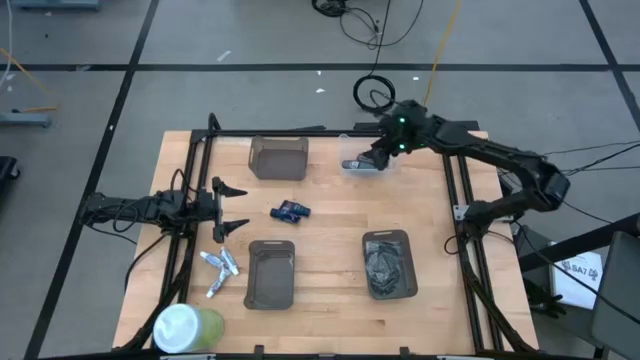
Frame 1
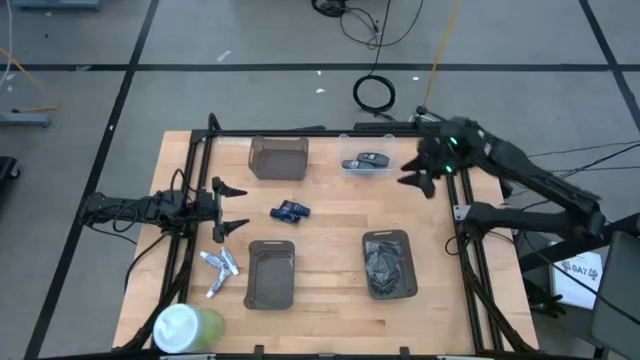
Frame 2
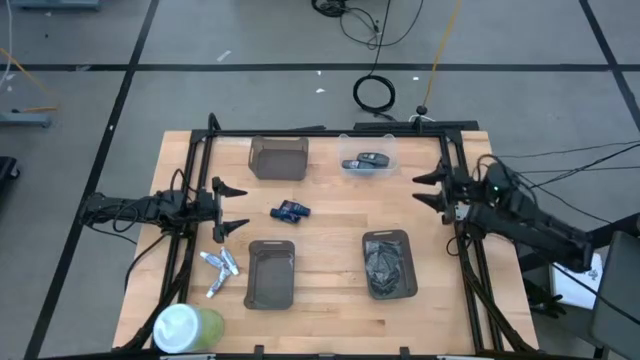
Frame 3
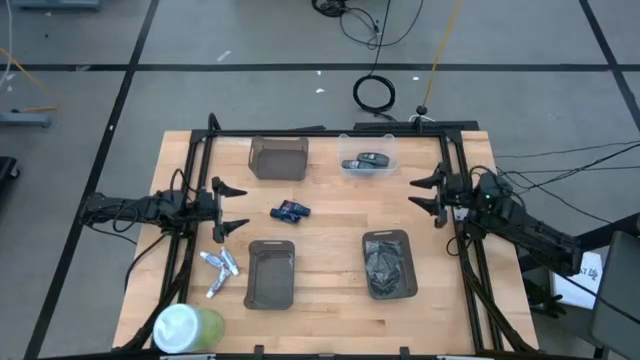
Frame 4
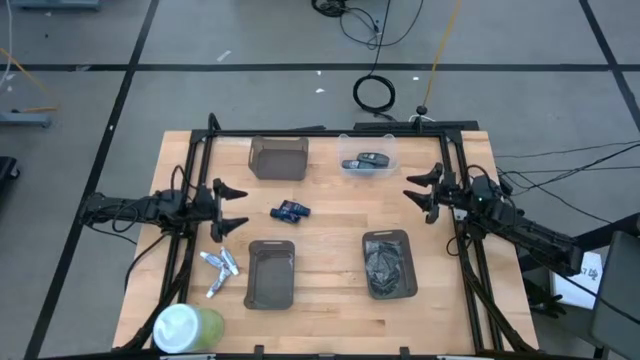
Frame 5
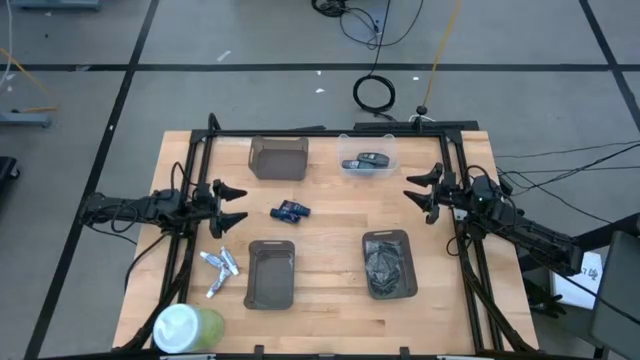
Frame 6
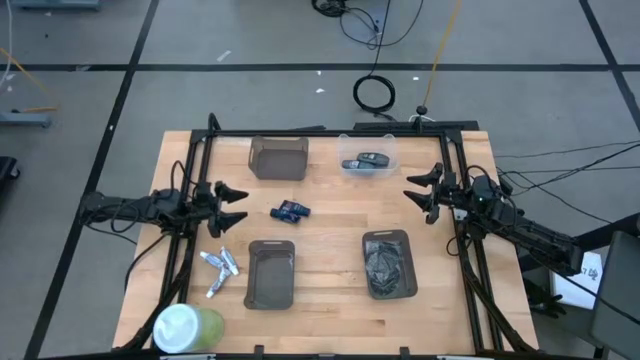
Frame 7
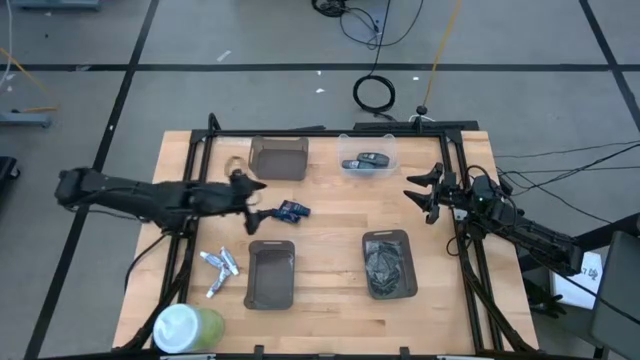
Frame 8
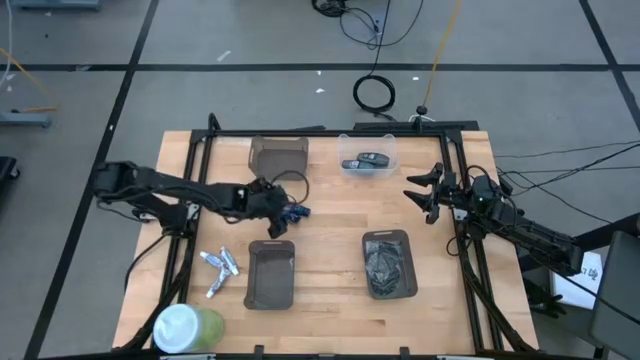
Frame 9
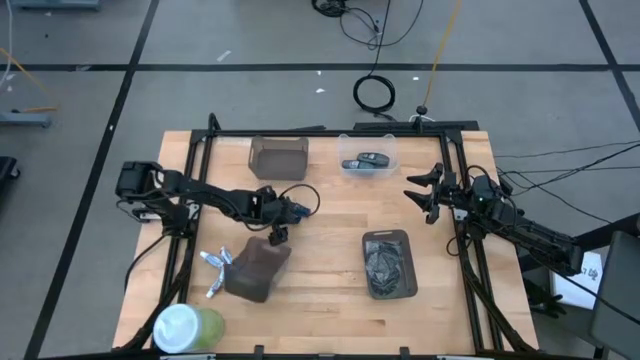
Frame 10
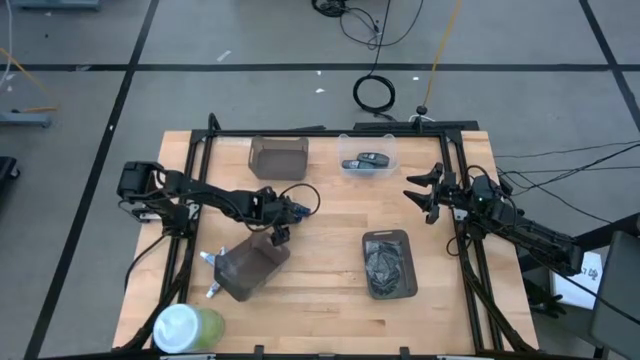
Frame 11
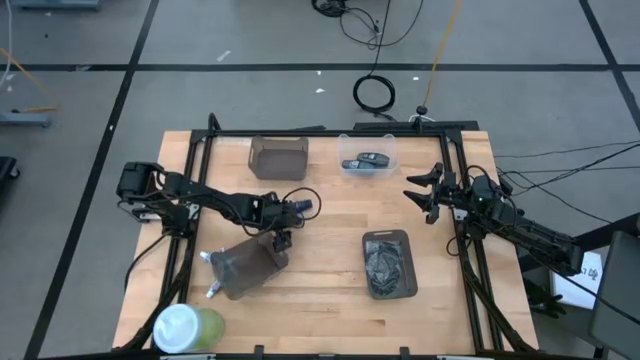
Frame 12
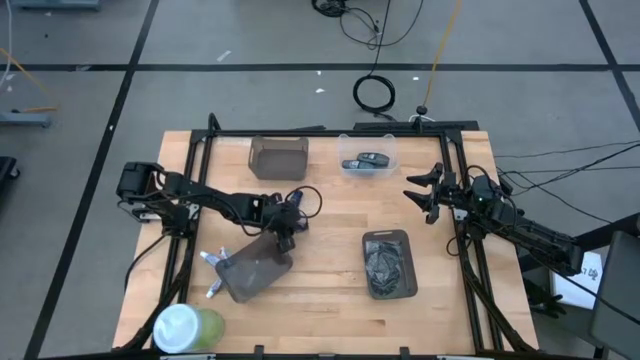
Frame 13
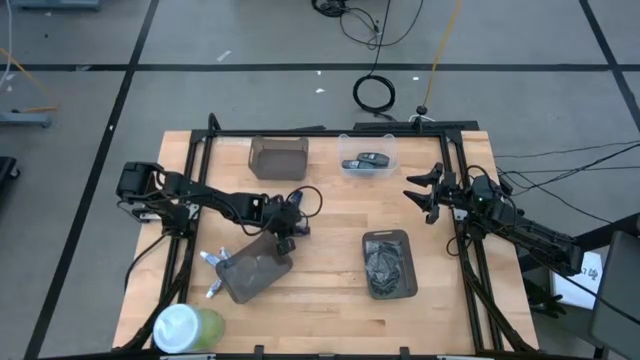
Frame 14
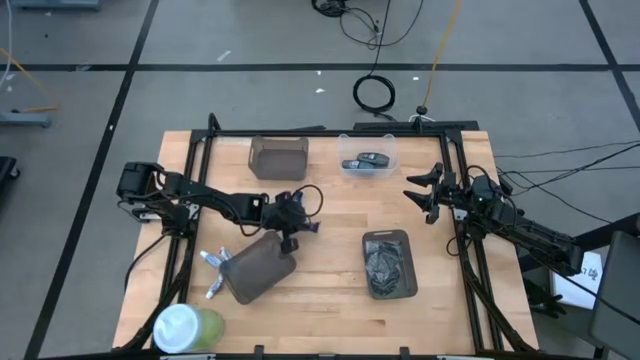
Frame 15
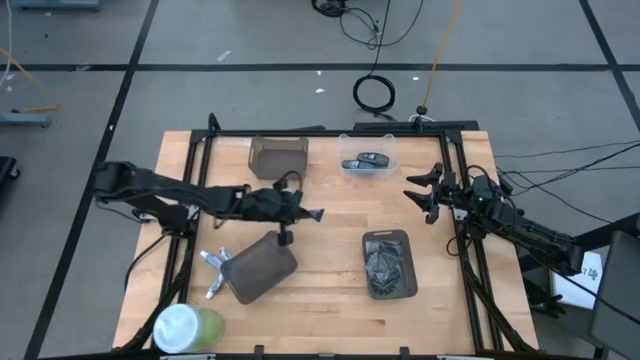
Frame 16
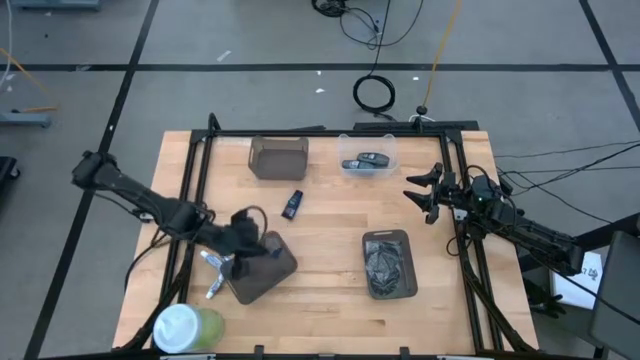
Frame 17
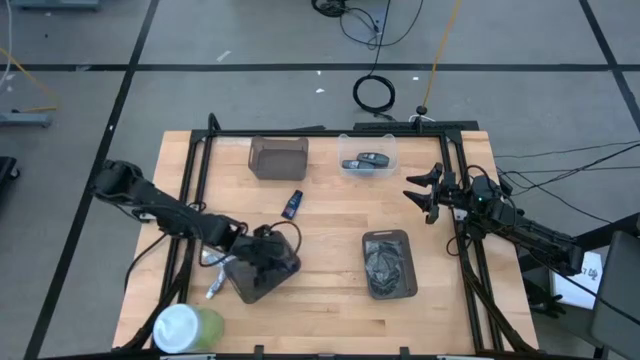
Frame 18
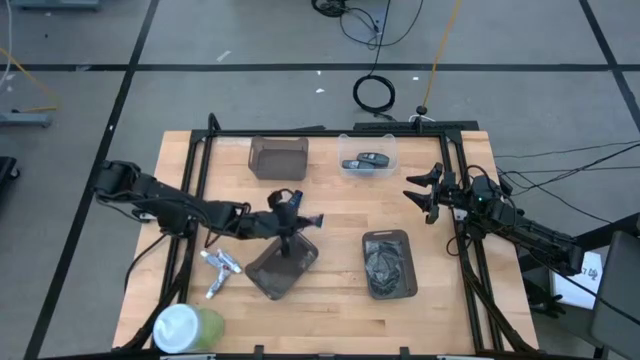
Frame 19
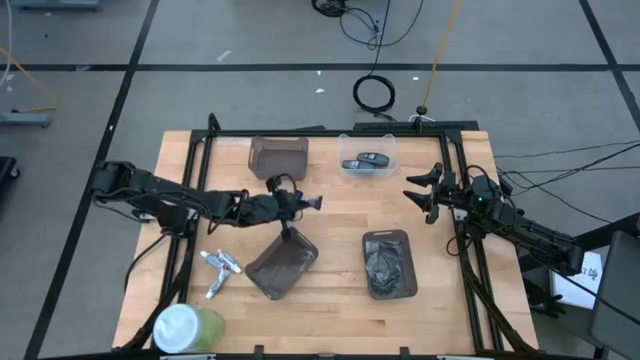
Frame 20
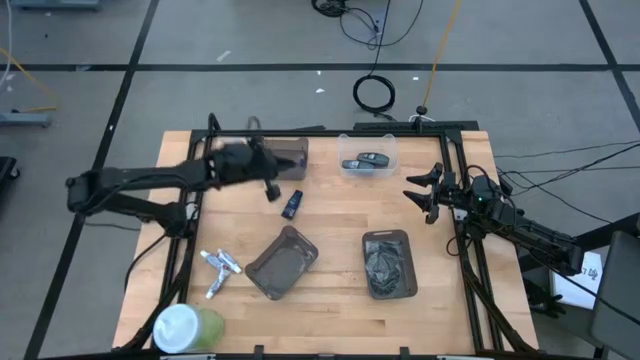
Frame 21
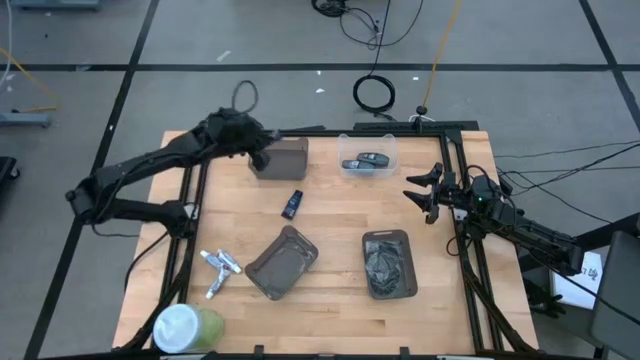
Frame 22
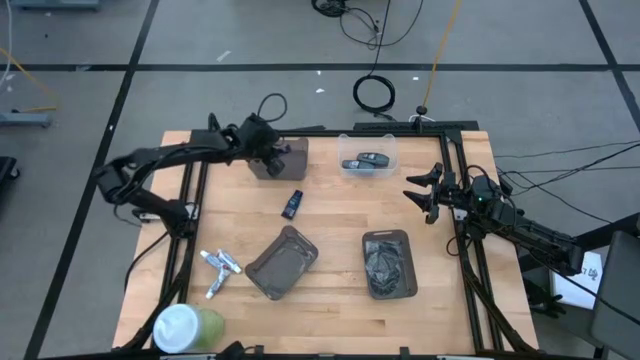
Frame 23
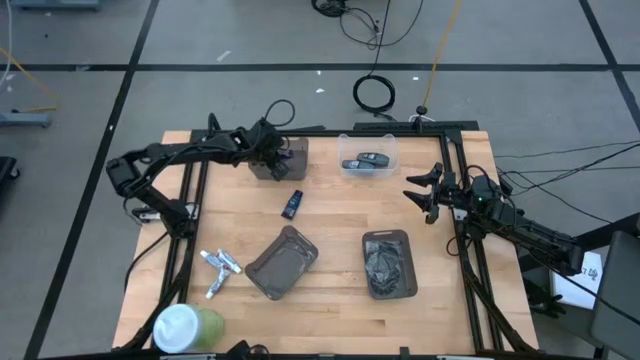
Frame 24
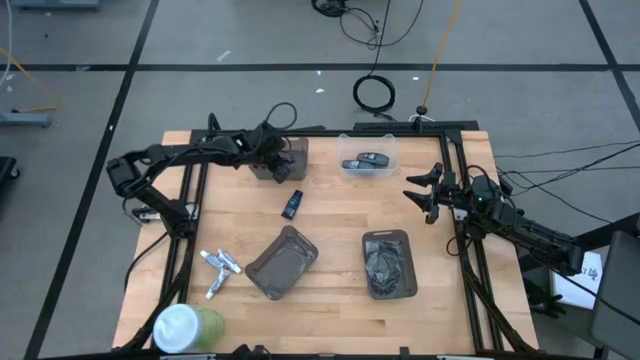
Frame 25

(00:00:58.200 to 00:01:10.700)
Task: Pick & Place Travel size toiletries
Put the bottom blue shave cream into the top black bin

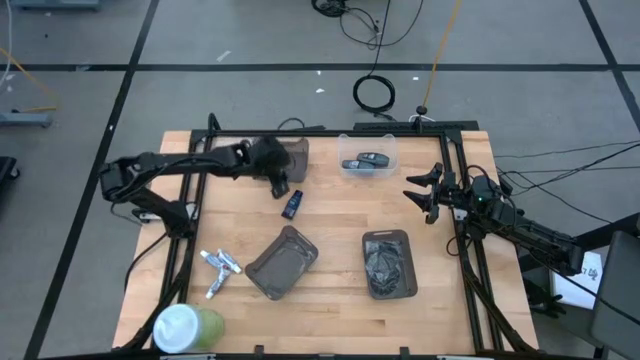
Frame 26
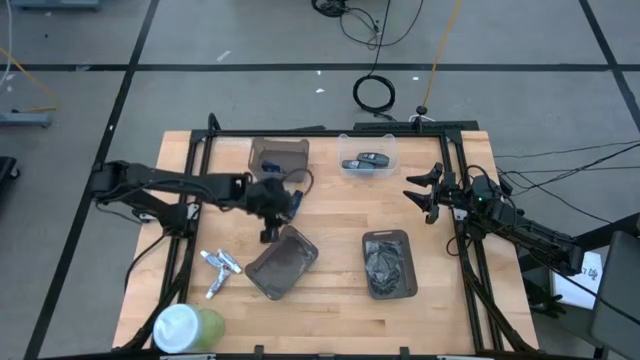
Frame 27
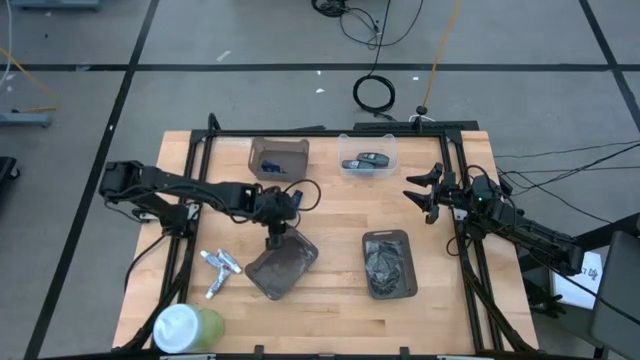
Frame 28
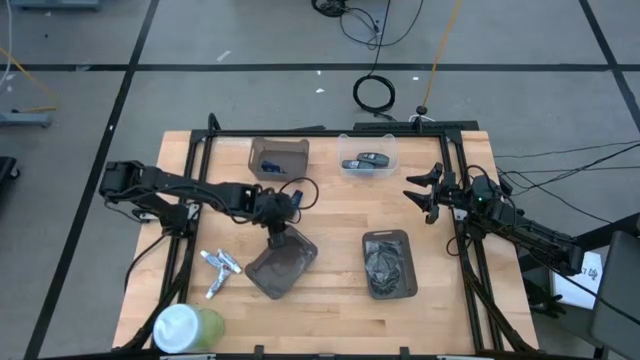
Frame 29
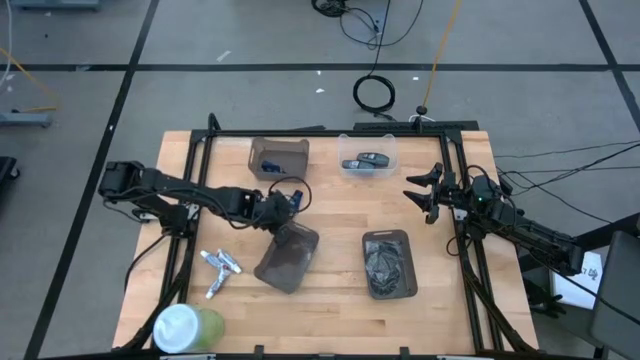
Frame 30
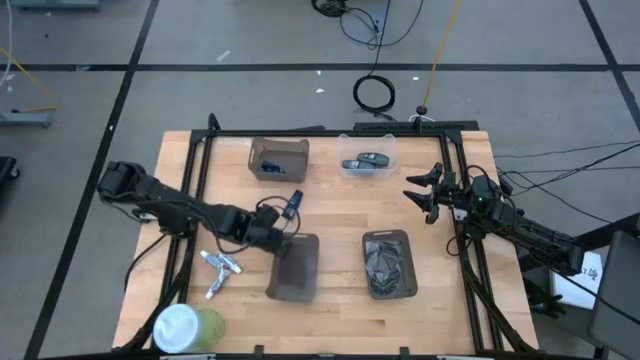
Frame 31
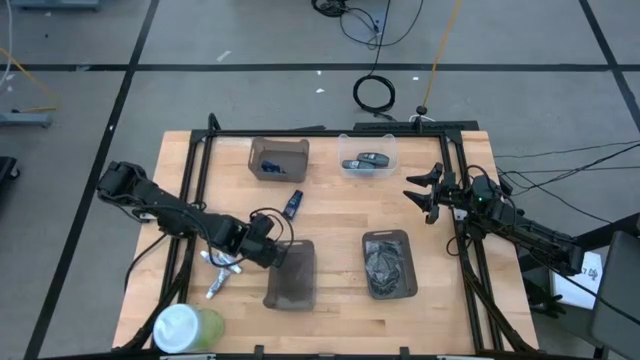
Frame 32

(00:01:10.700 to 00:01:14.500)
Adjust the bottom left black bin

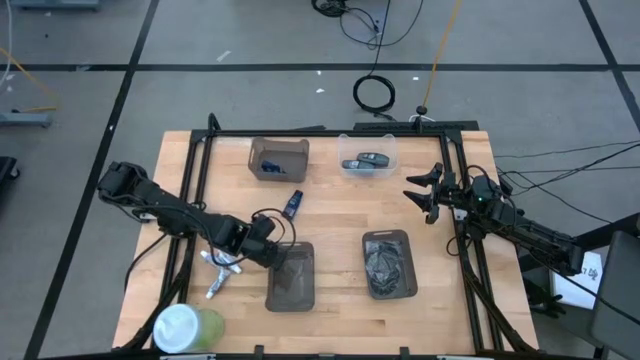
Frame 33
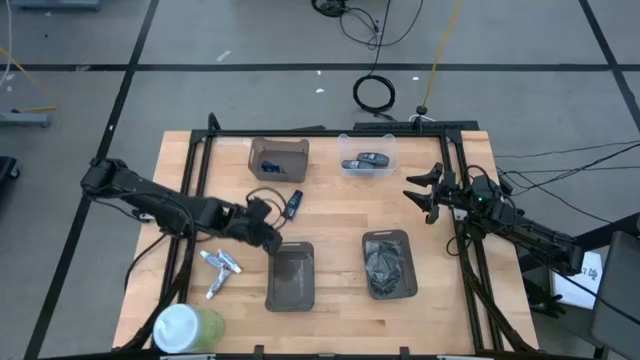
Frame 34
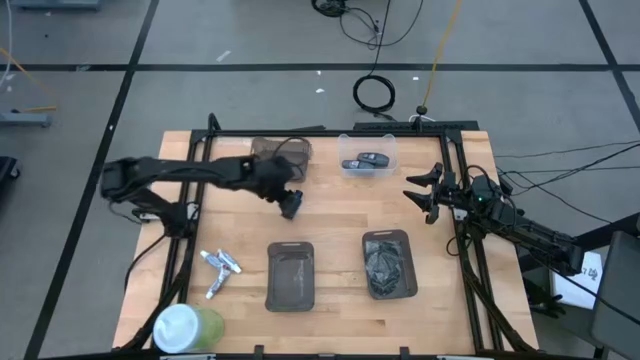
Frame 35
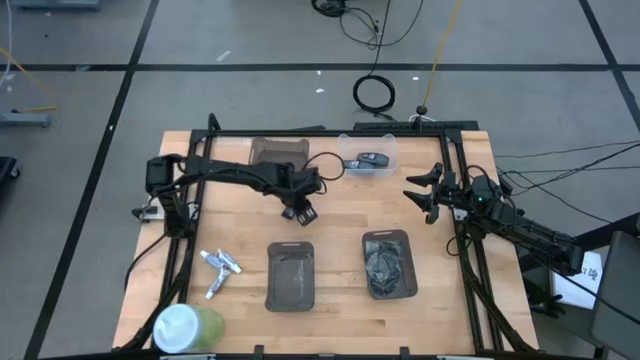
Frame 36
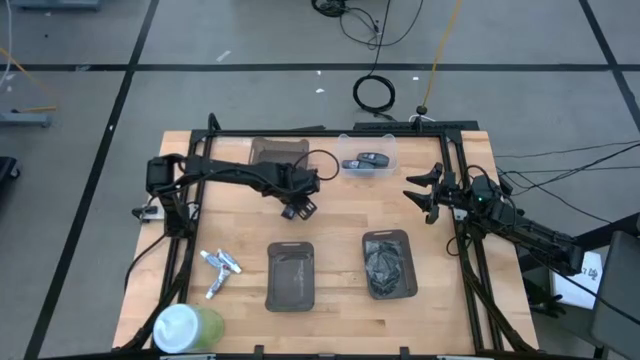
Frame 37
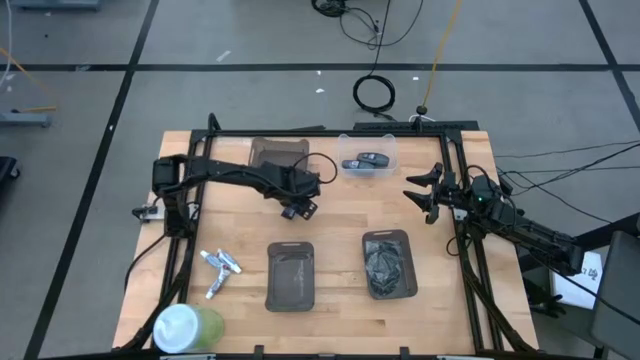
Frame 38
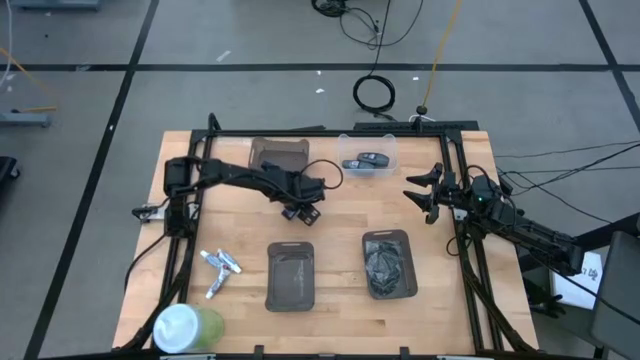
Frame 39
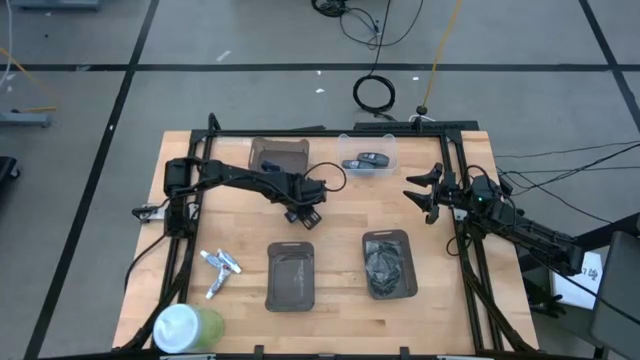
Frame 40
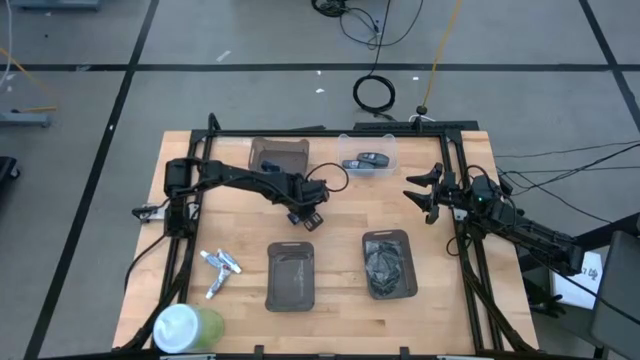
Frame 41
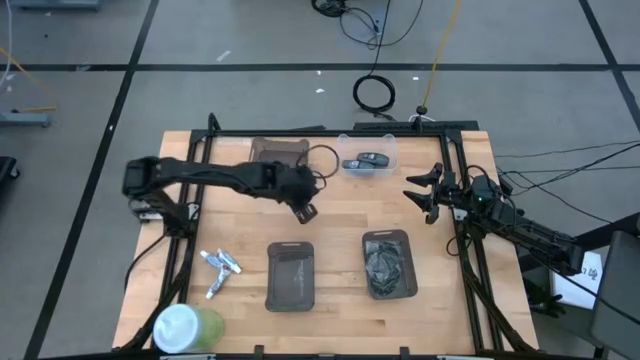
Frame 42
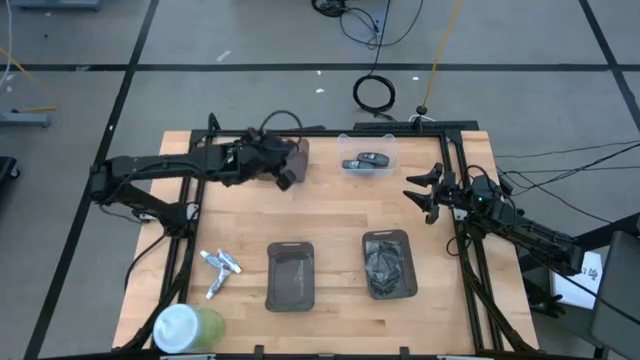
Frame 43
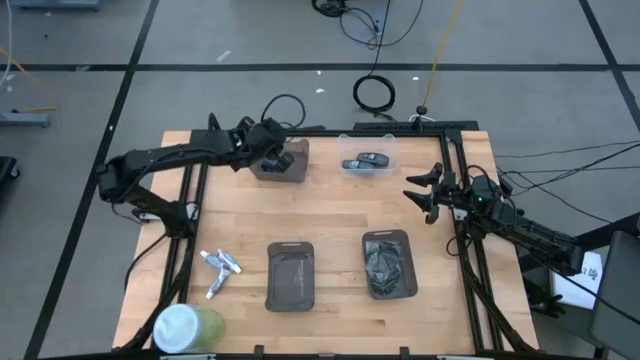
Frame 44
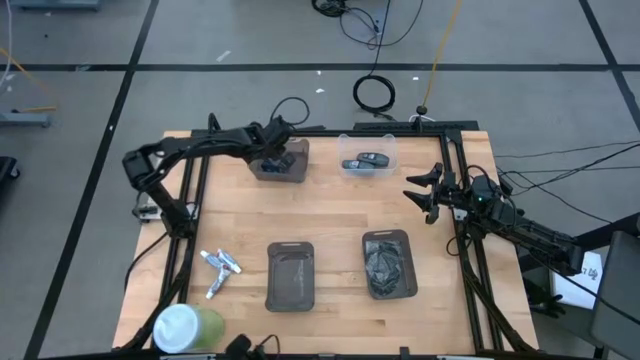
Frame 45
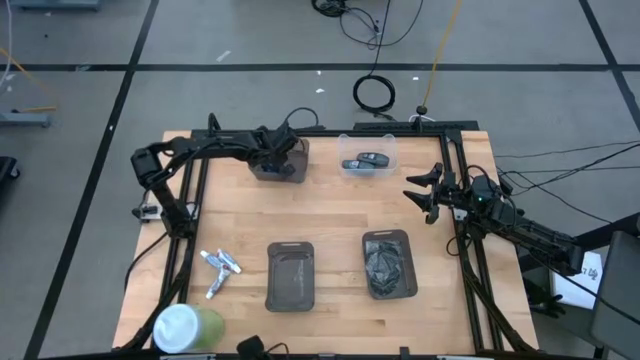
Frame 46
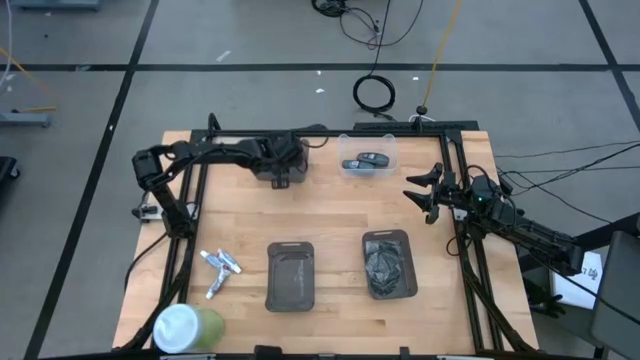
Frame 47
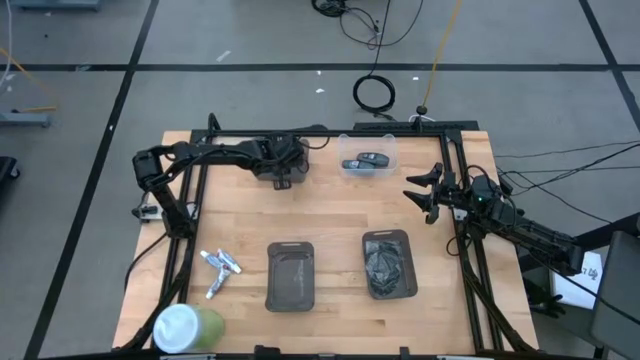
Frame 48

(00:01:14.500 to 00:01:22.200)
Put the blue shave cream into the top black bin
